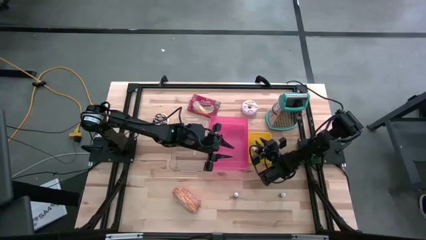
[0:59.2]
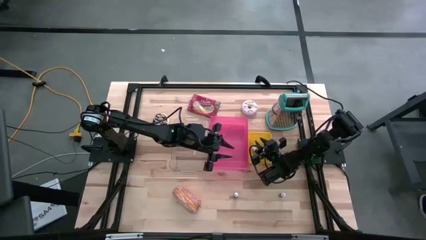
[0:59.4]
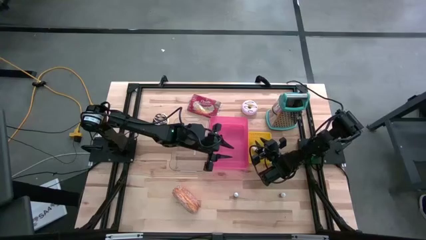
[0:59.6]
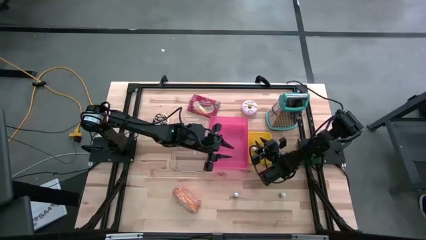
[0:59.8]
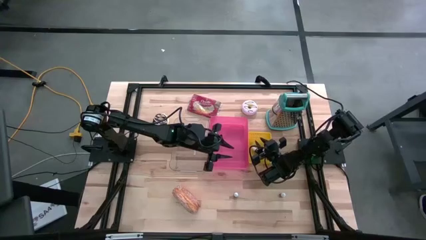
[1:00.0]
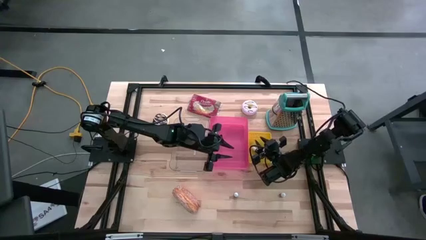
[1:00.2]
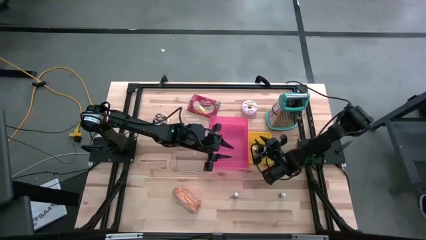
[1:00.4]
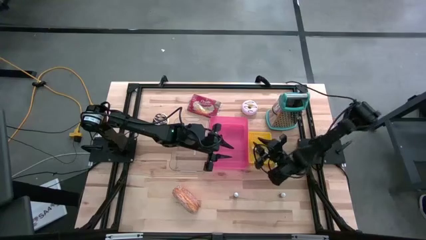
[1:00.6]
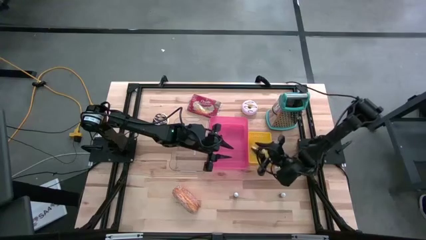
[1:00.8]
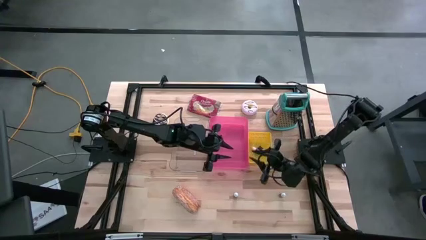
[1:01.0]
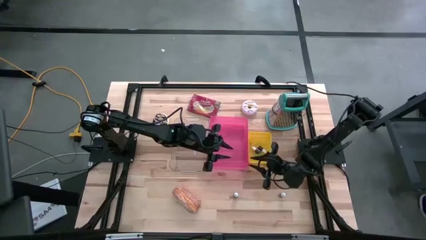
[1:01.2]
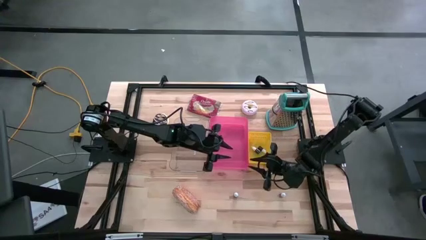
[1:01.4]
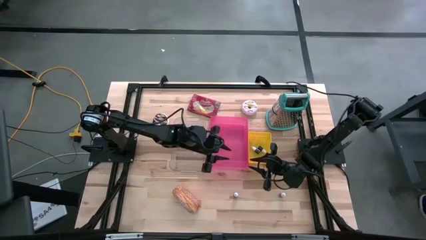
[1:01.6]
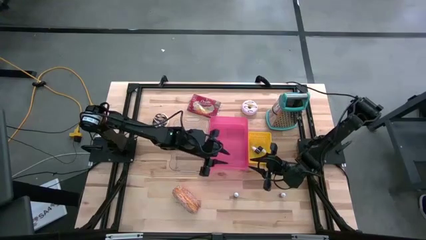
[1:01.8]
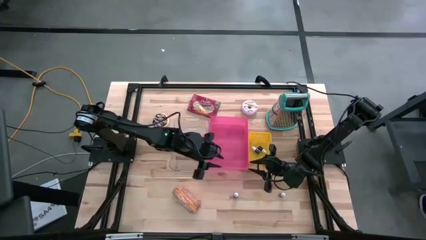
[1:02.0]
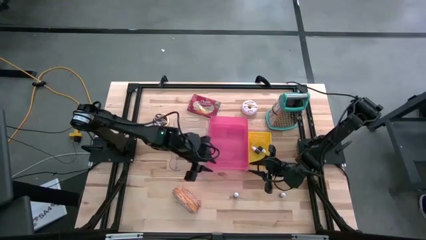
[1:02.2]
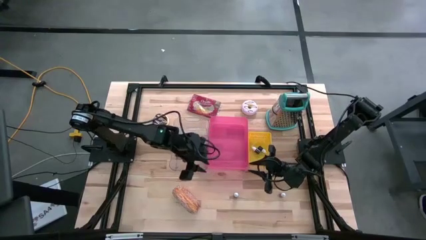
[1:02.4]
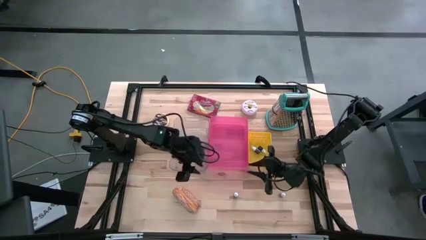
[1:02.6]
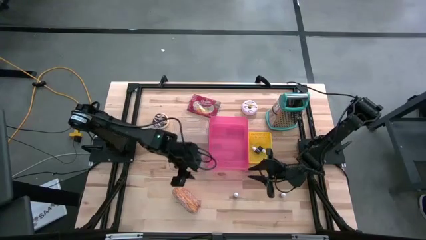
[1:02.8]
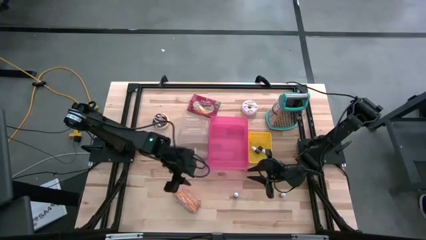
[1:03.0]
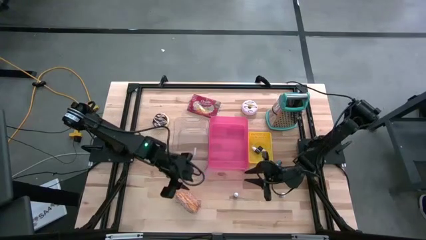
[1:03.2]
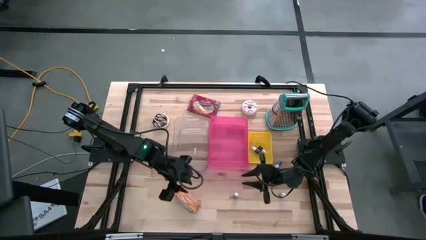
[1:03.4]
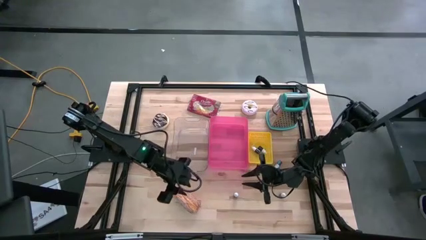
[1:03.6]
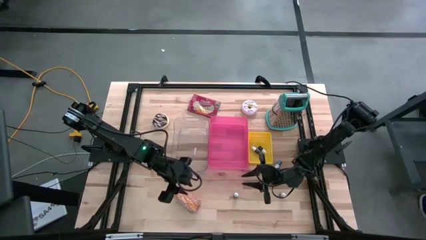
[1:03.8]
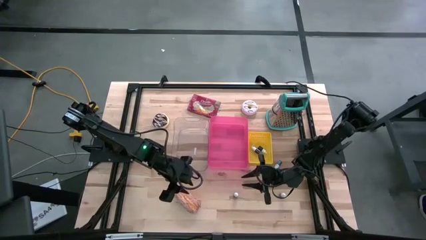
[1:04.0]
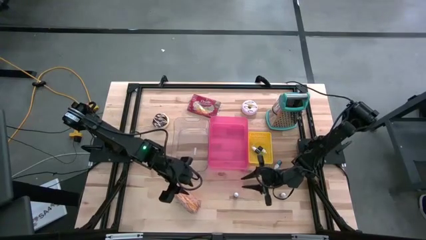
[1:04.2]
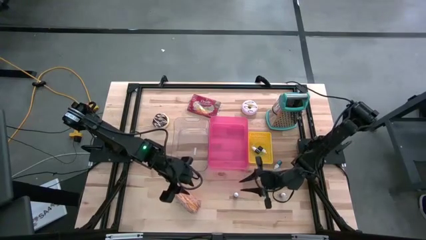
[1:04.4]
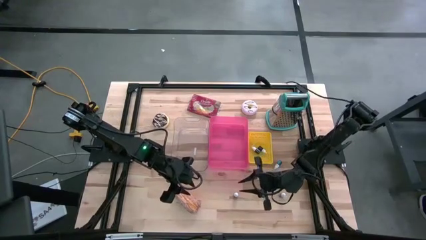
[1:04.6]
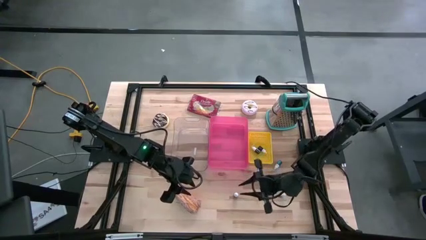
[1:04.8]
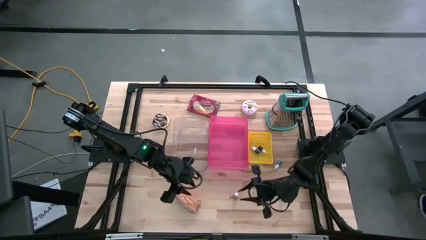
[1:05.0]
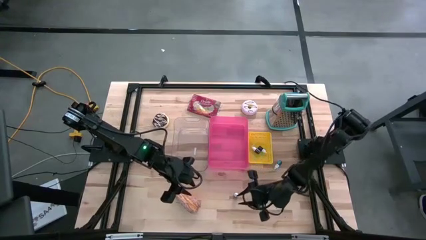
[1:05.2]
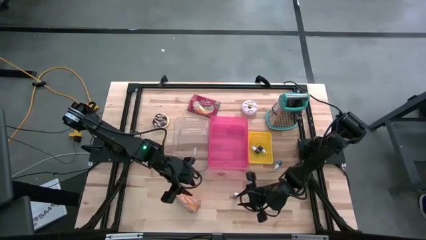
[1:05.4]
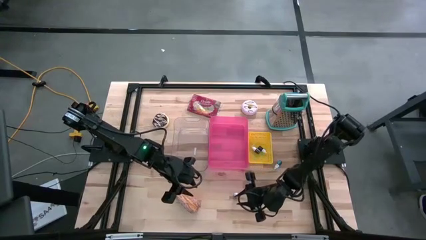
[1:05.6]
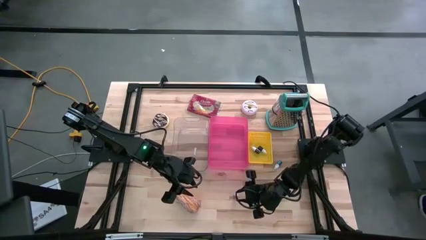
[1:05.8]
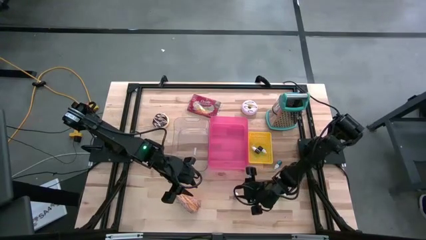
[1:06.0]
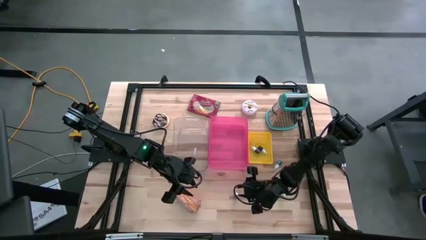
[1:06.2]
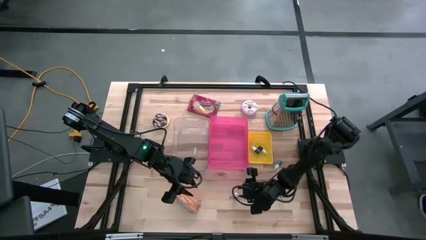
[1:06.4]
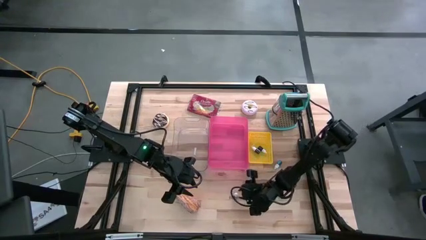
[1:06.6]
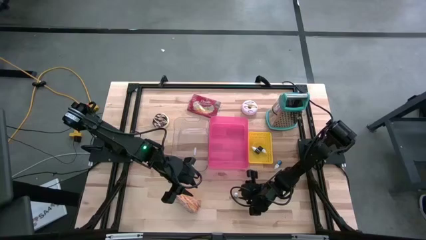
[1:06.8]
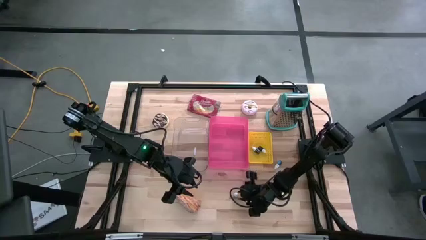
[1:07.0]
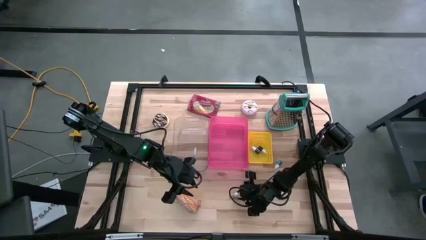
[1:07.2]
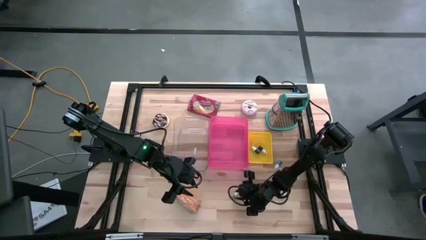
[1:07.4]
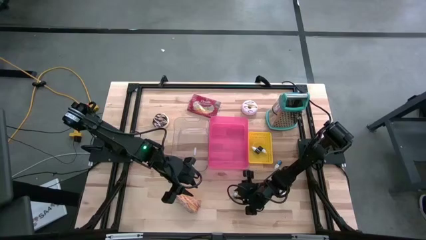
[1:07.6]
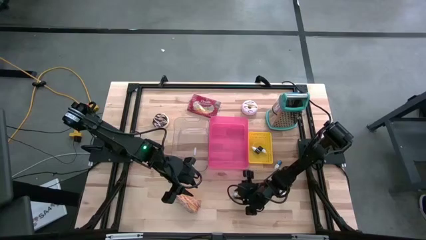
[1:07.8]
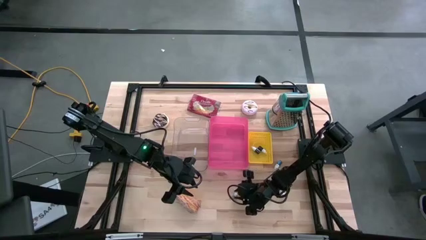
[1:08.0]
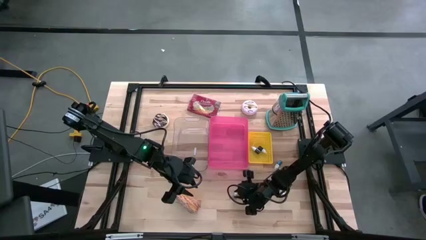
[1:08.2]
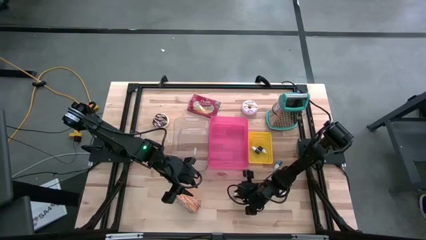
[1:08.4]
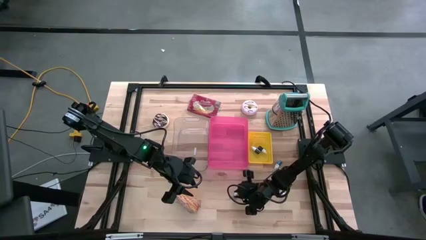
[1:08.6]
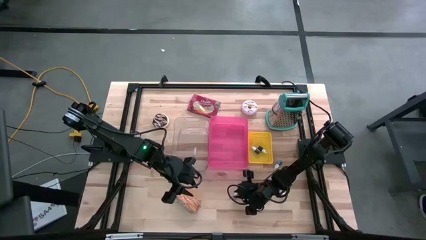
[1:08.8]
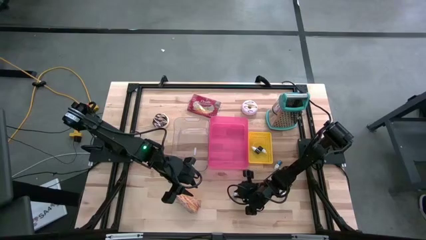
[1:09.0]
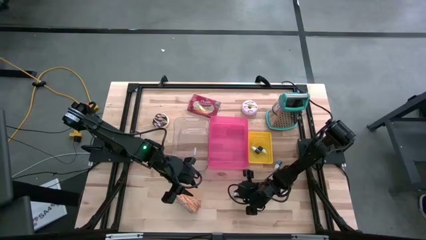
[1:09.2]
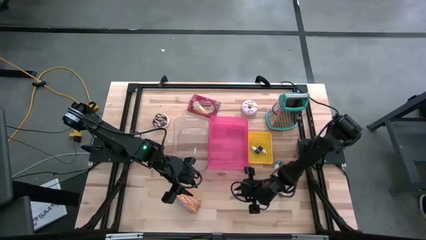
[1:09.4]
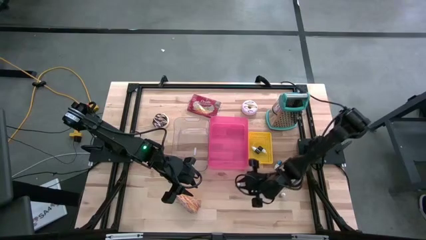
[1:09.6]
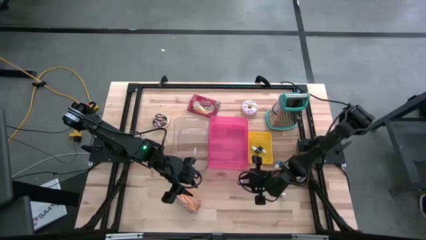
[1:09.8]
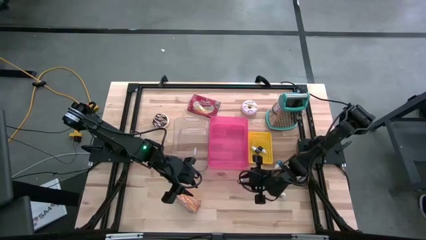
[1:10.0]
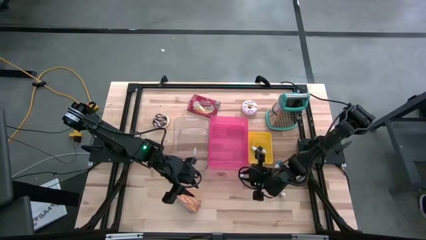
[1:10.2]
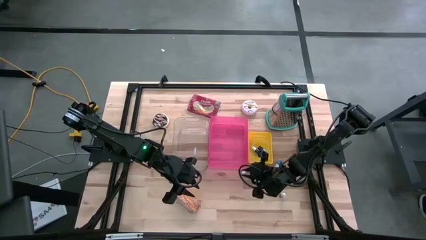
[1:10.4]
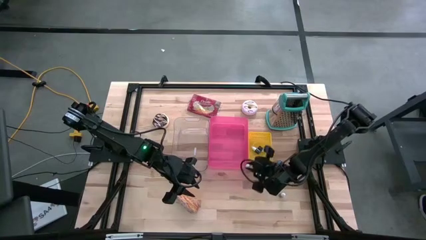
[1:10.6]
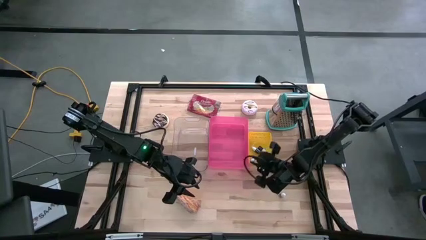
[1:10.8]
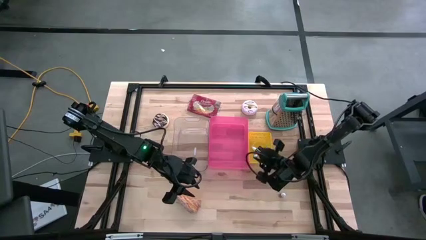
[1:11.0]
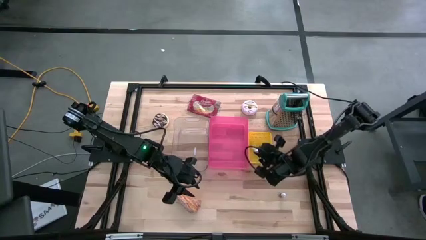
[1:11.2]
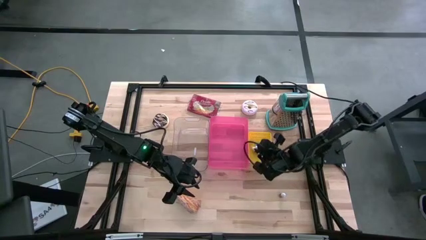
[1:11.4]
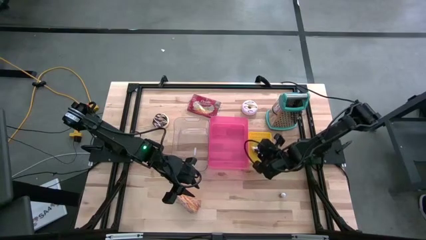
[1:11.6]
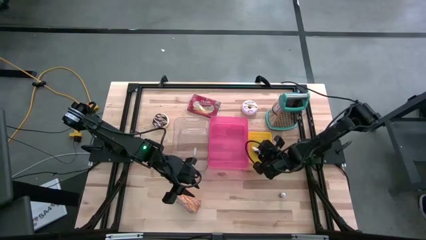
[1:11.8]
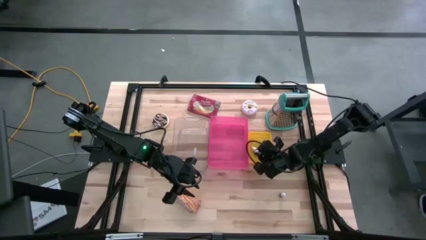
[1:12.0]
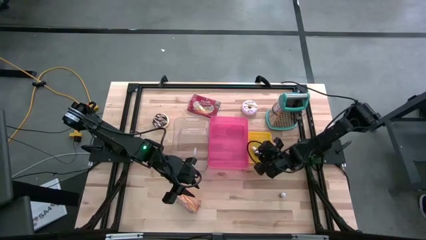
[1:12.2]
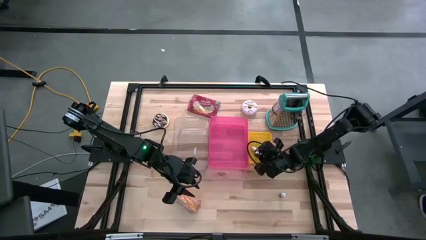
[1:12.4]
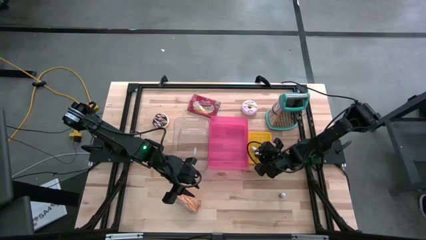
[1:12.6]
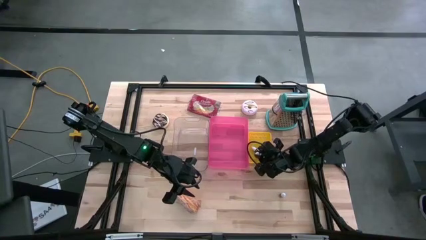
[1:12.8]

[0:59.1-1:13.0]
Put the left brown food coloring bottle into the yellow bin
